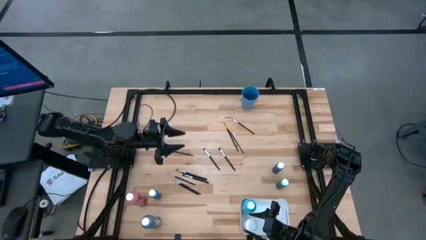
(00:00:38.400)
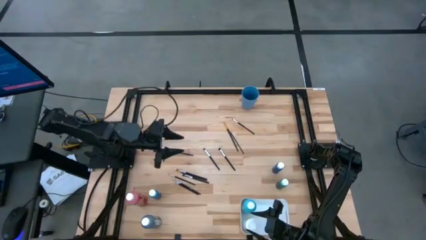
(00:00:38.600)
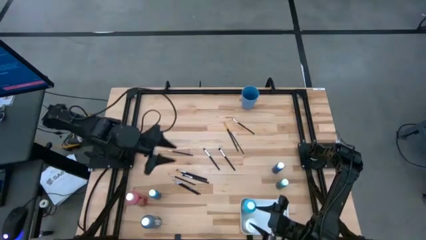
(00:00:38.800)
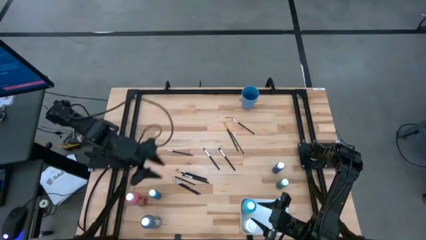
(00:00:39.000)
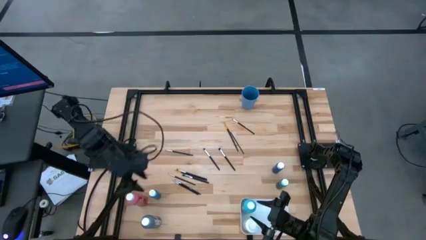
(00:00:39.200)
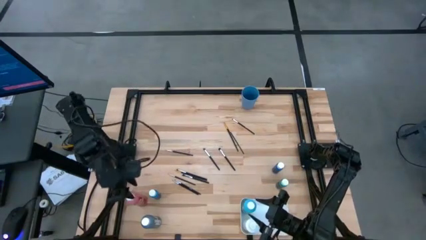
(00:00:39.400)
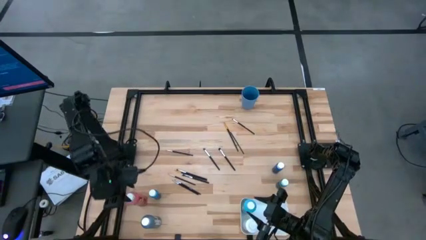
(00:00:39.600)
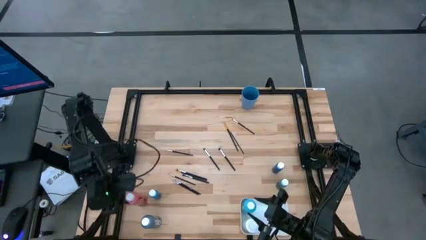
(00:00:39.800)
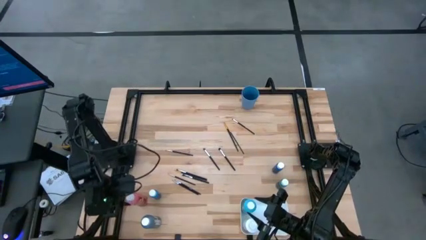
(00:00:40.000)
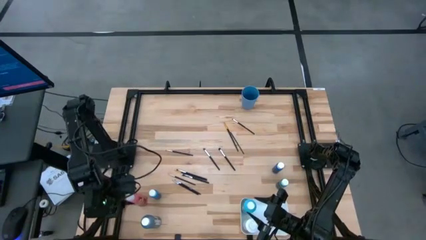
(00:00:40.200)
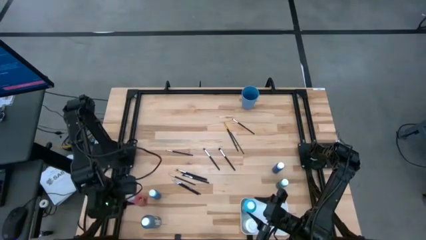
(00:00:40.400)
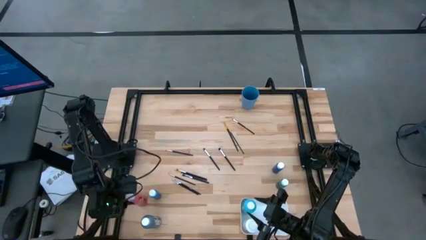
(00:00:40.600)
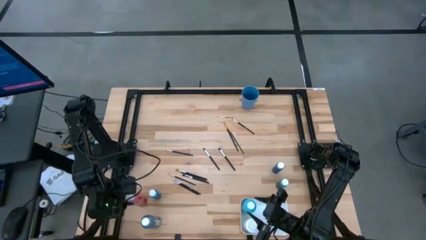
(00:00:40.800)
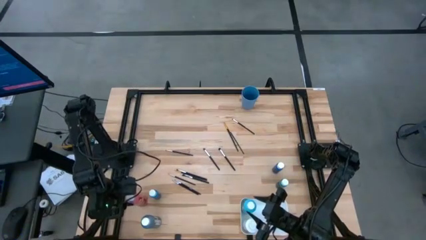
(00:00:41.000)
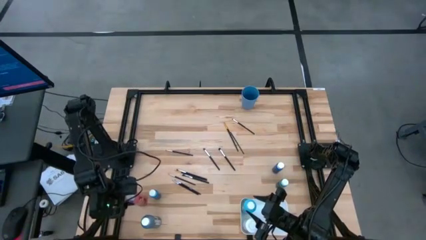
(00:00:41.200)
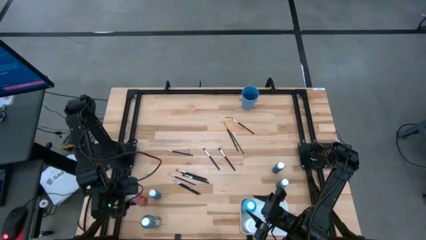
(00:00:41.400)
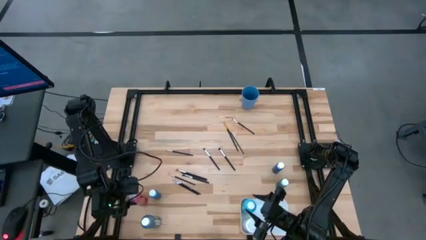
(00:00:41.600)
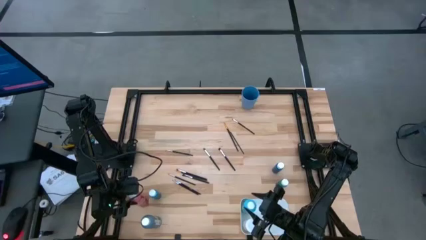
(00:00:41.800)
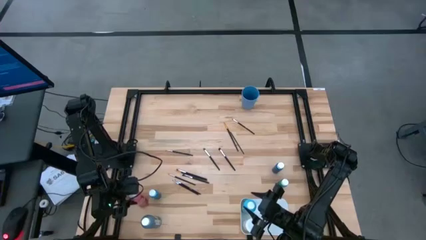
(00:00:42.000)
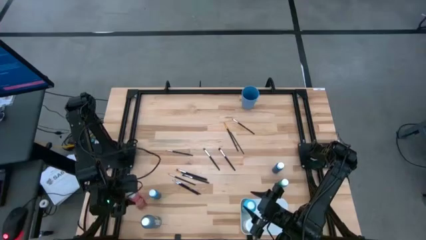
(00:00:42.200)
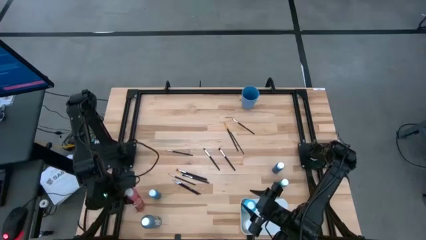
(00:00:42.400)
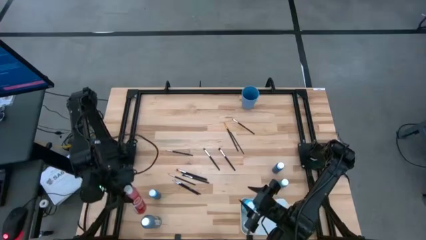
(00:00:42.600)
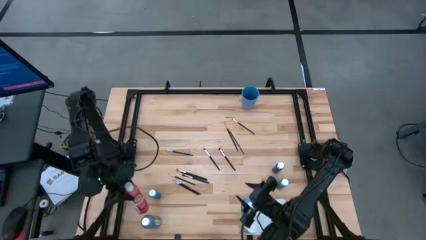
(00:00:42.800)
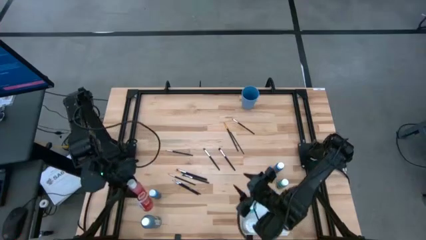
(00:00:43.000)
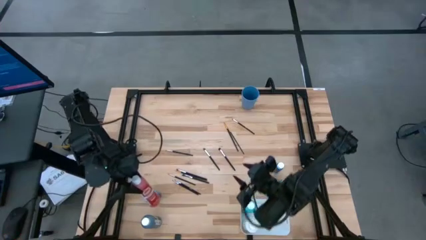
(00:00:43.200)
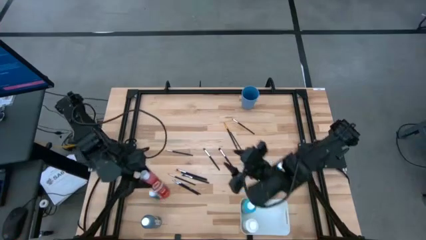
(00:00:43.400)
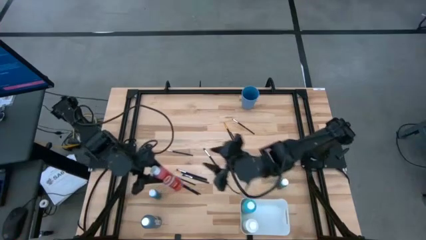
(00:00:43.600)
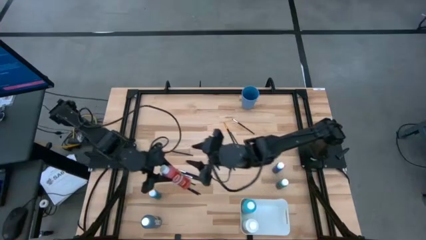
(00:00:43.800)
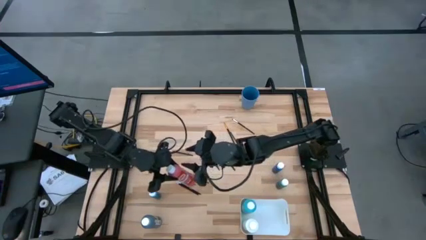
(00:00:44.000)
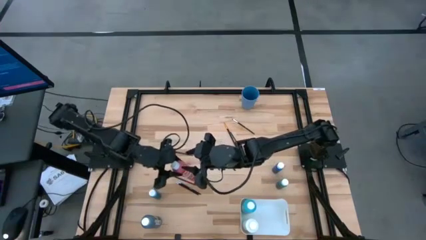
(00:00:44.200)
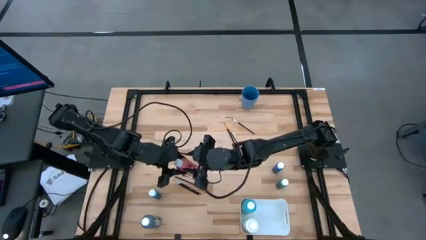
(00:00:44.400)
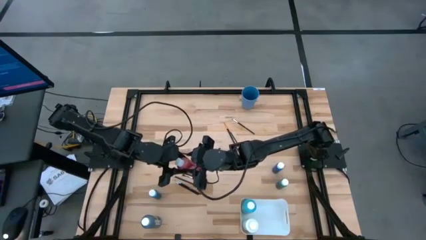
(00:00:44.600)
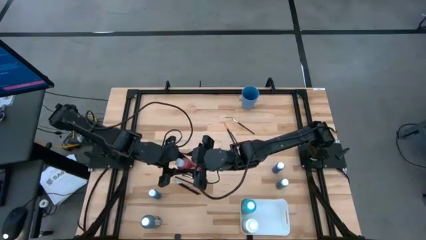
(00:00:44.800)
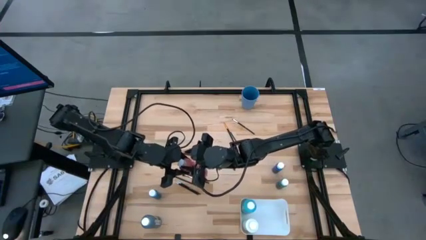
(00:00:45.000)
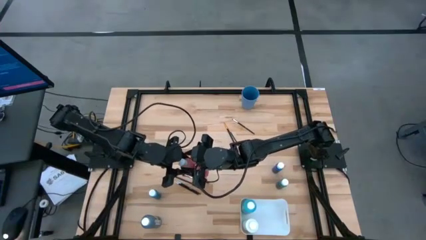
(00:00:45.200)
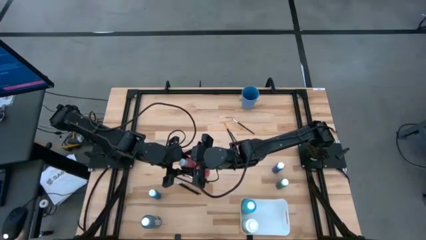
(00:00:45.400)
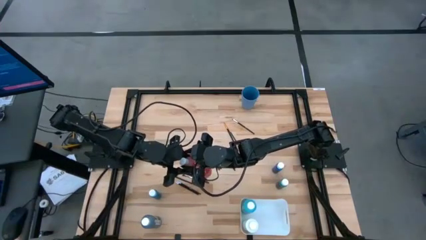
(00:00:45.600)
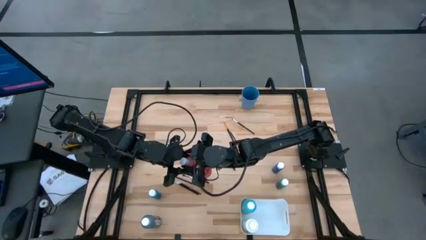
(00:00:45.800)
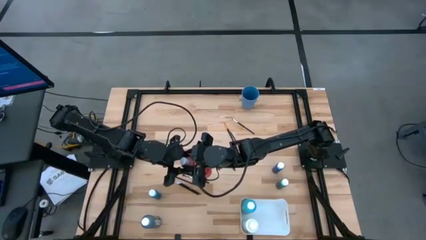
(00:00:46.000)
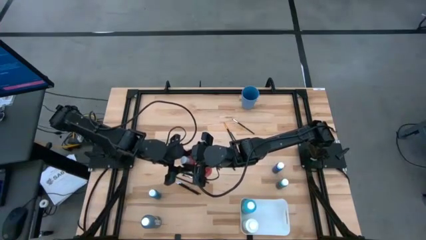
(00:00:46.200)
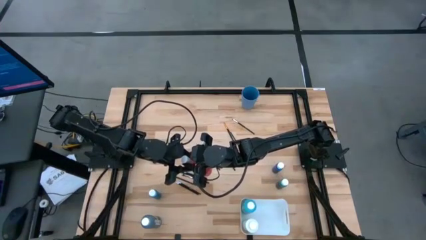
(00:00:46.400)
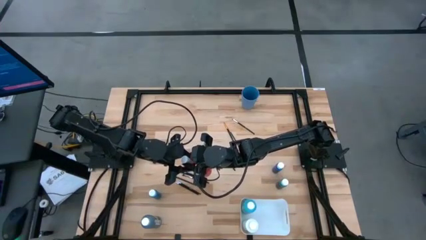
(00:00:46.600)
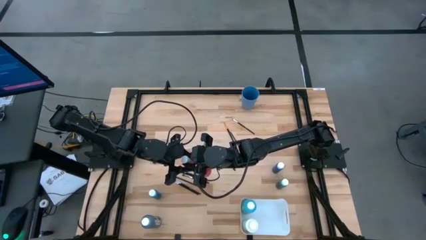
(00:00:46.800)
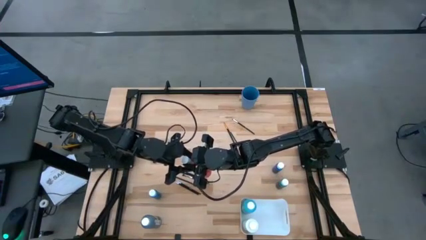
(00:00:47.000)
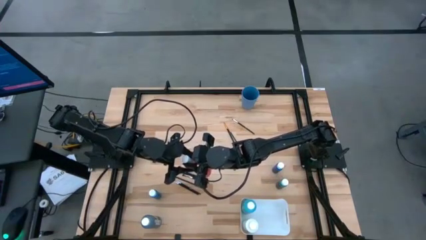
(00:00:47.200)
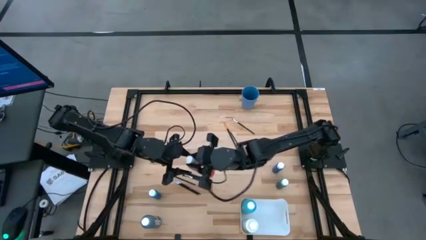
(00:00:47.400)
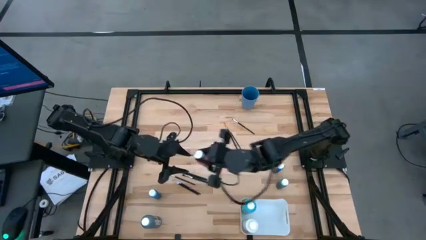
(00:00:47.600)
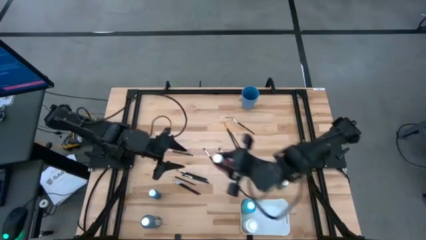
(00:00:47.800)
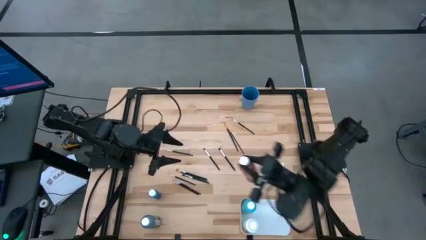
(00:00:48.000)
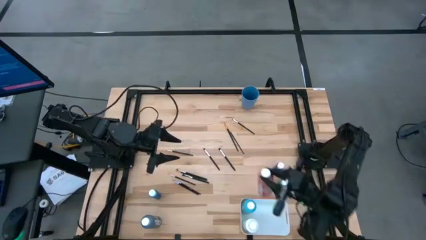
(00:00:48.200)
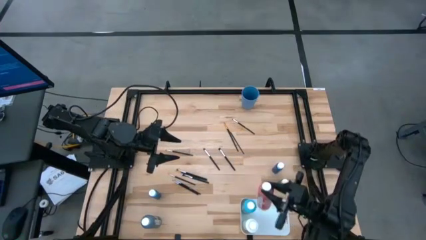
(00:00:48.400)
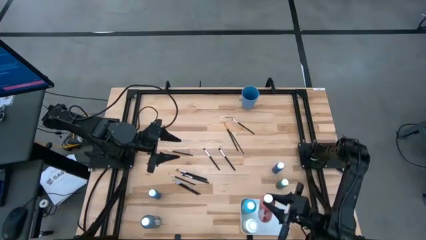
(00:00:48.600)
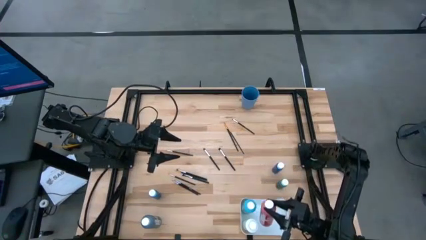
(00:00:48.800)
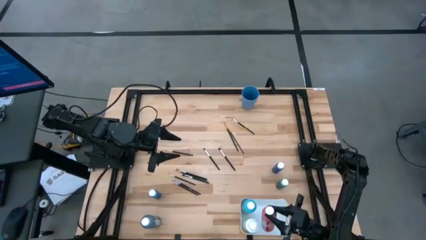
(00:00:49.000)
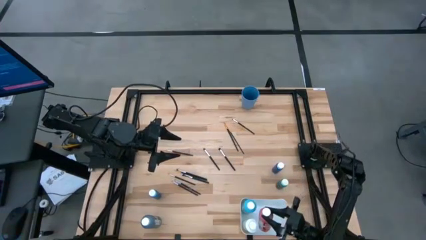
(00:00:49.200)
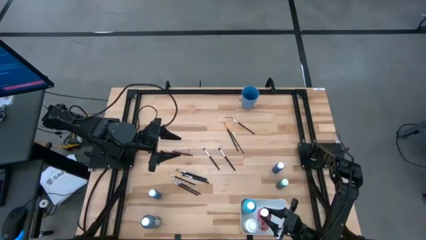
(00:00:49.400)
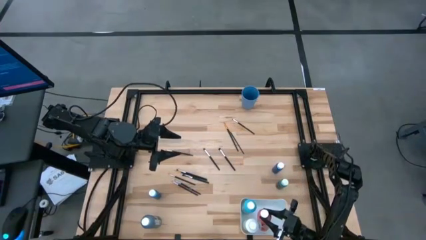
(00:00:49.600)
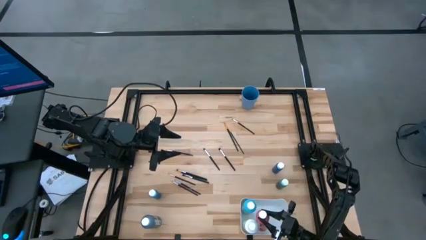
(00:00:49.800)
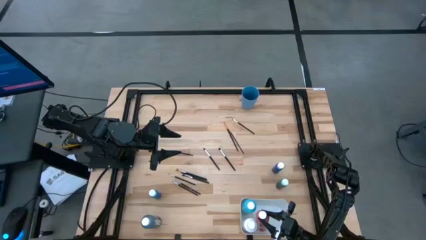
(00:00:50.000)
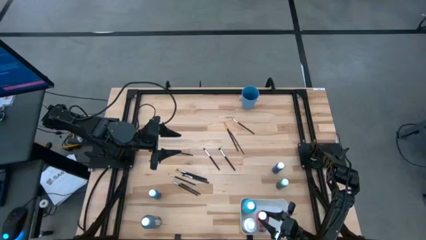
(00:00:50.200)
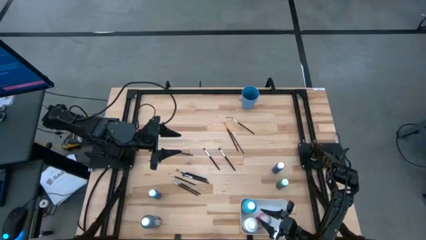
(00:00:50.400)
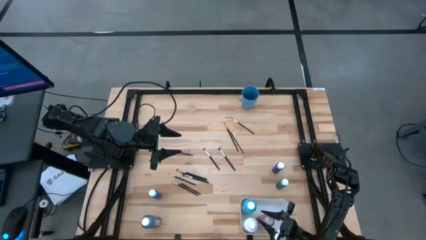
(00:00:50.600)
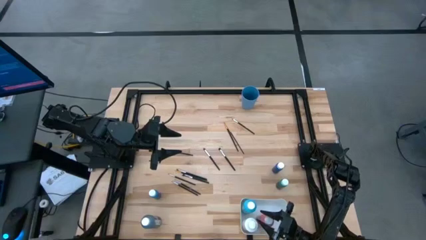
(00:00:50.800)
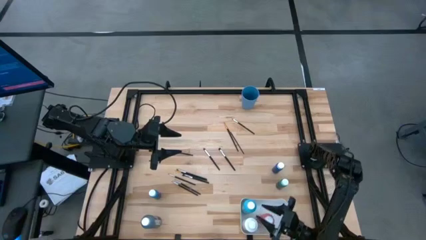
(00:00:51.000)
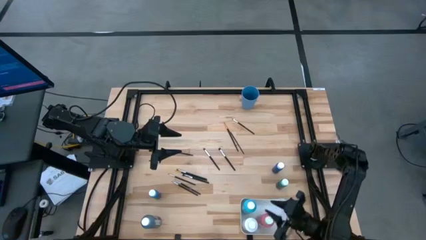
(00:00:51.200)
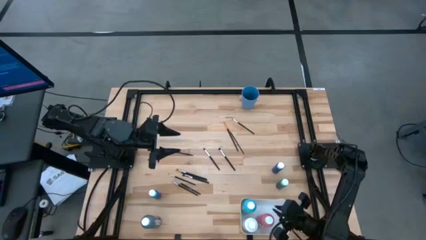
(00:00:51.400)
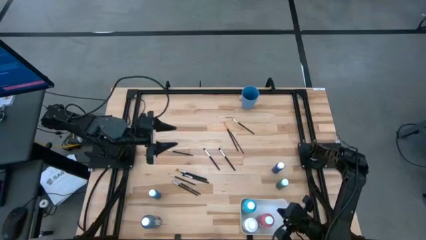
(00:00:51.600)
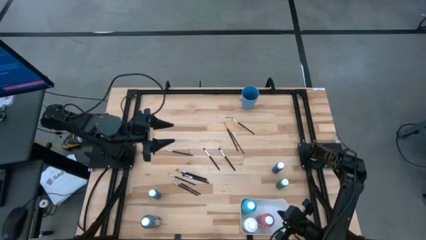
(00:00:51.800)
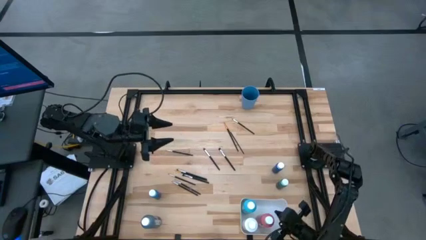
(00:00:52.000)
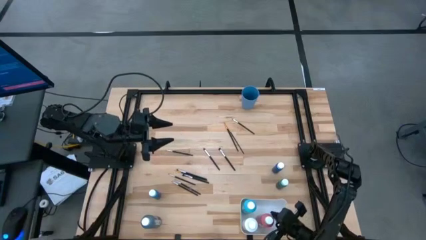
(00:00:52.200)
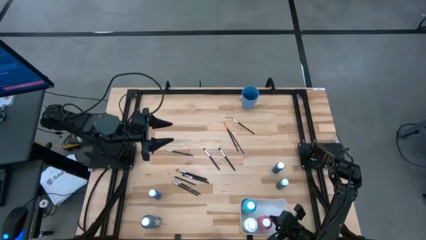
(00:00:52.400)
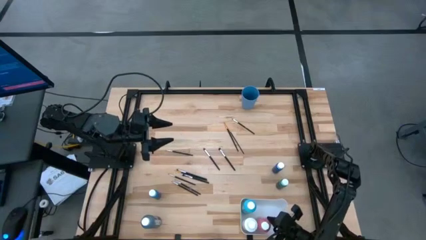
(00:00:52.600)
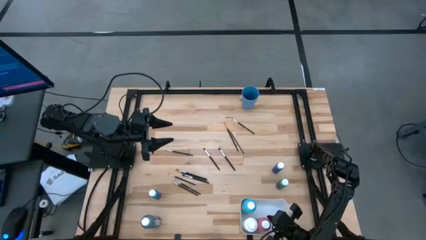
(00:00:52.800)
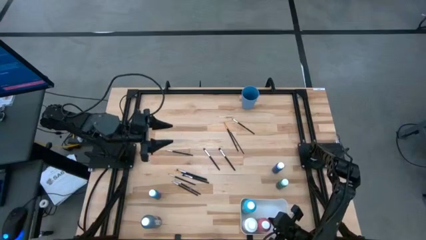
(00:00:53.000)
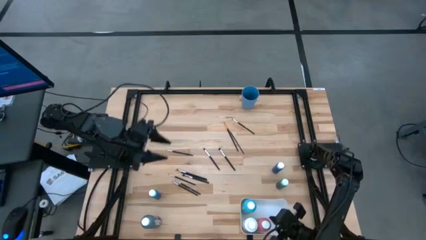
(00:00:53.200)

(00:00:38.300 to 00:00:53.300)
Task: Pick & Place Paint Supplies
Put the large pink paint bottle into the white bin
